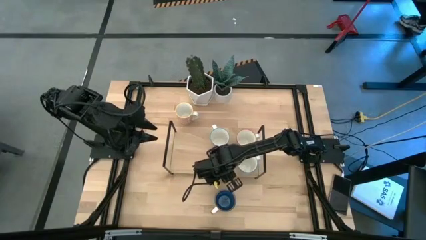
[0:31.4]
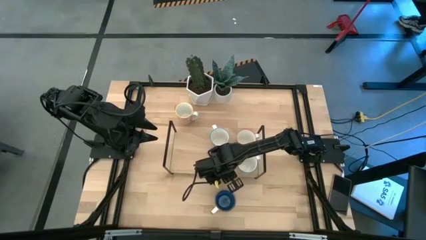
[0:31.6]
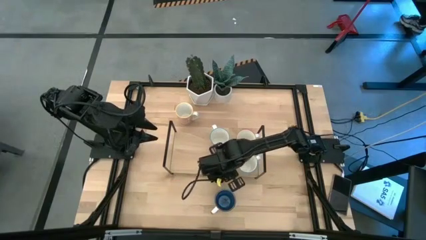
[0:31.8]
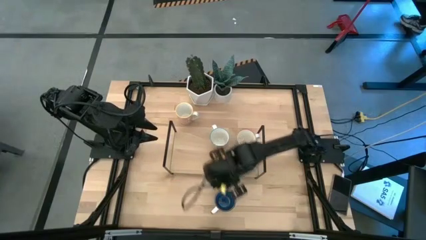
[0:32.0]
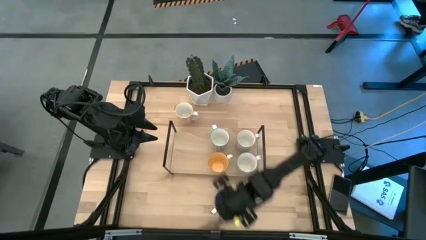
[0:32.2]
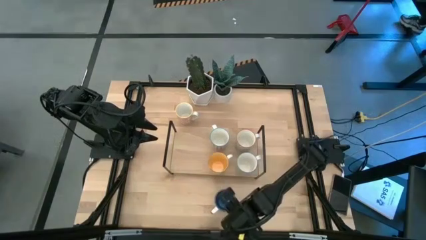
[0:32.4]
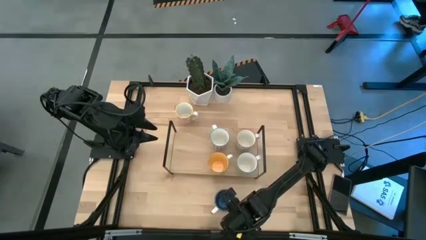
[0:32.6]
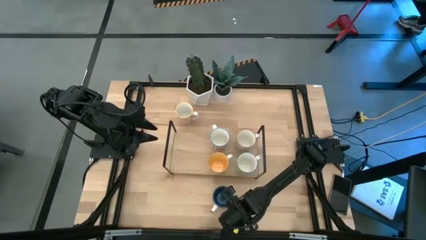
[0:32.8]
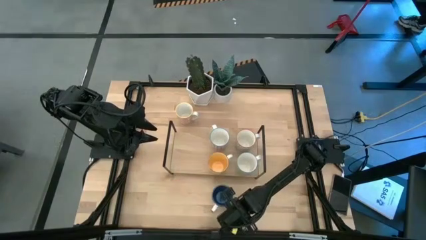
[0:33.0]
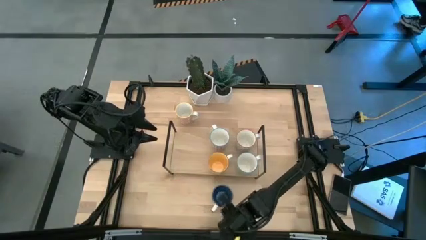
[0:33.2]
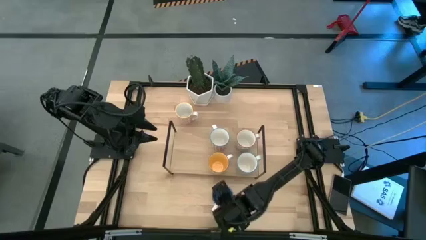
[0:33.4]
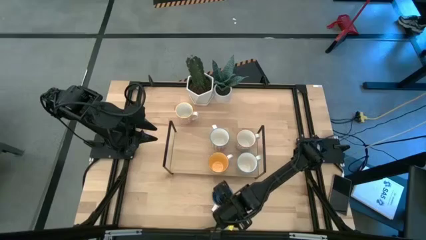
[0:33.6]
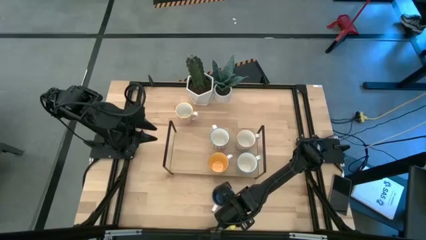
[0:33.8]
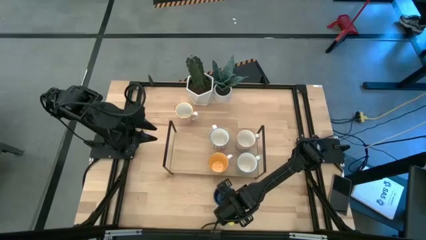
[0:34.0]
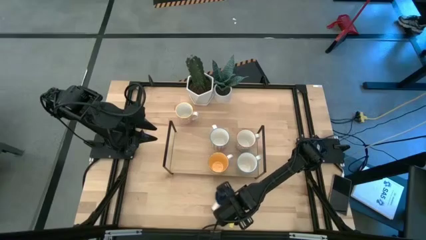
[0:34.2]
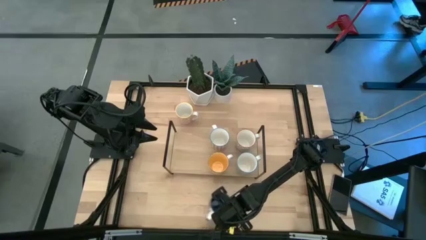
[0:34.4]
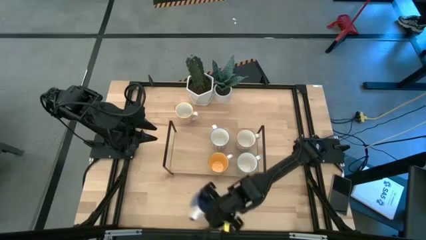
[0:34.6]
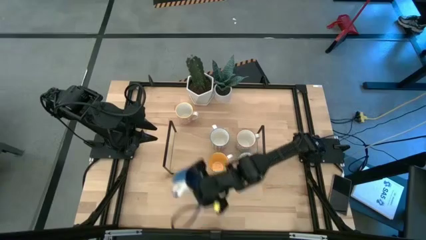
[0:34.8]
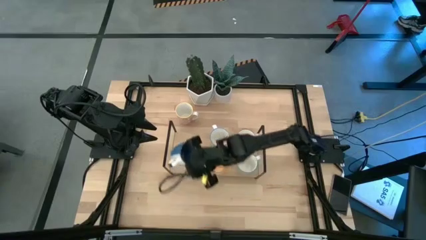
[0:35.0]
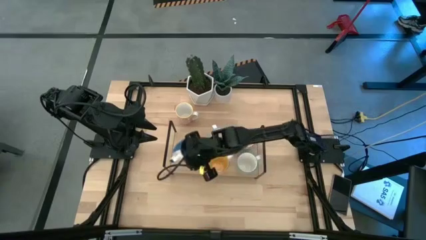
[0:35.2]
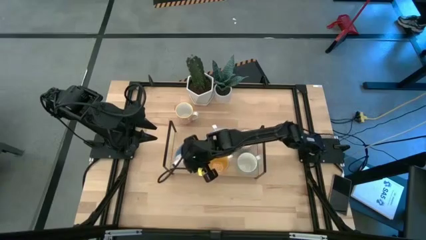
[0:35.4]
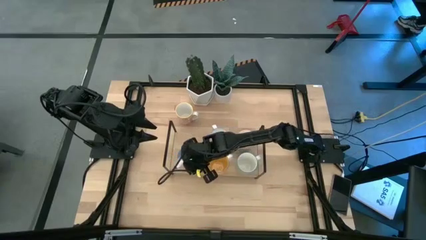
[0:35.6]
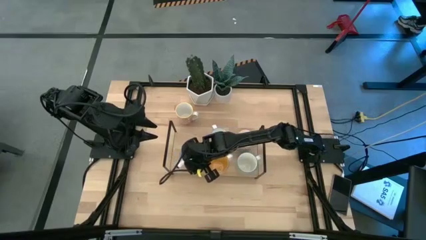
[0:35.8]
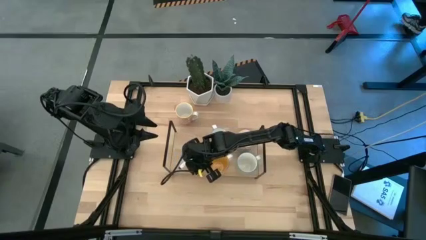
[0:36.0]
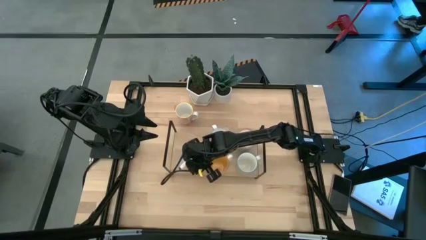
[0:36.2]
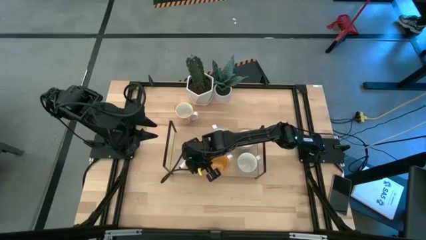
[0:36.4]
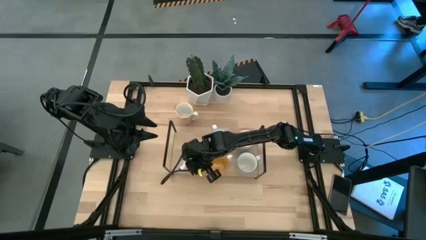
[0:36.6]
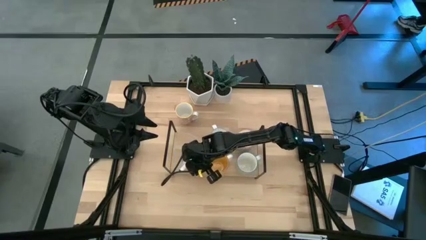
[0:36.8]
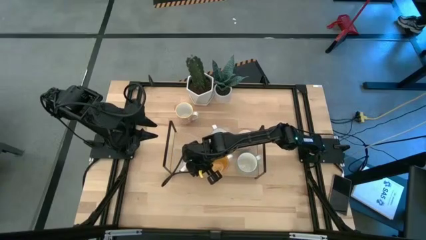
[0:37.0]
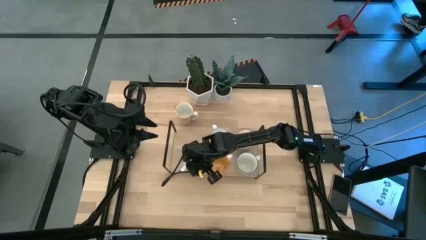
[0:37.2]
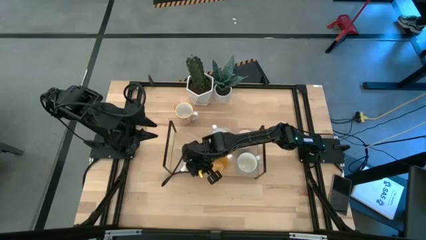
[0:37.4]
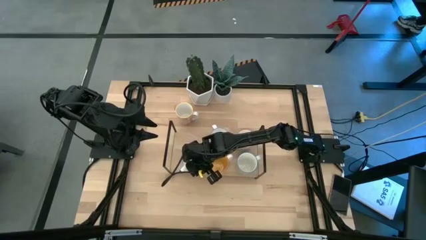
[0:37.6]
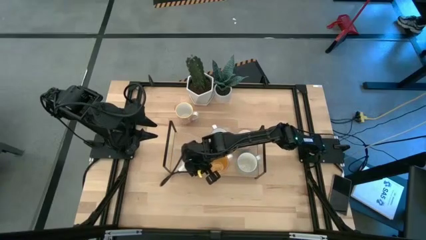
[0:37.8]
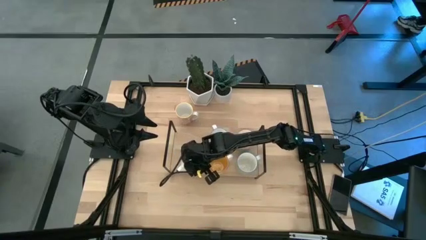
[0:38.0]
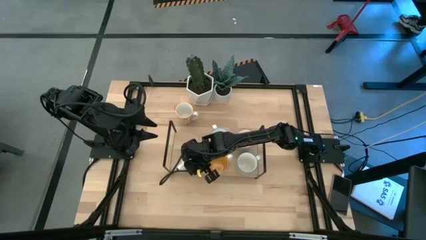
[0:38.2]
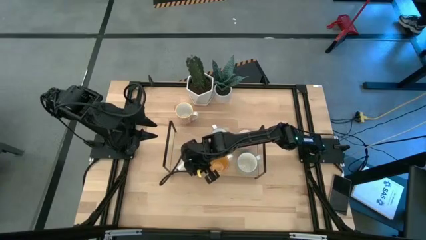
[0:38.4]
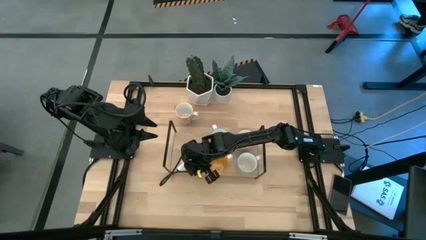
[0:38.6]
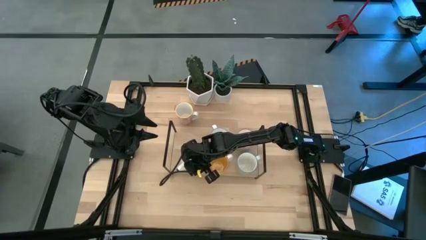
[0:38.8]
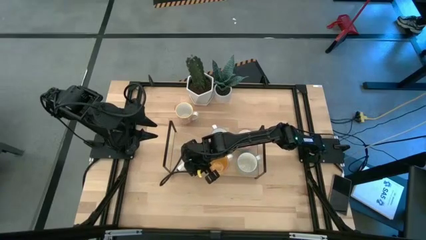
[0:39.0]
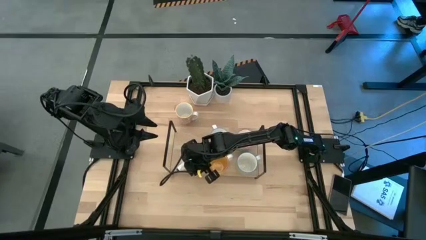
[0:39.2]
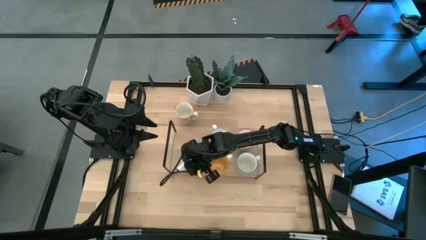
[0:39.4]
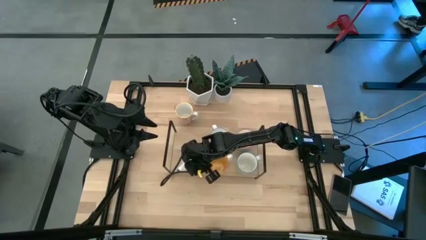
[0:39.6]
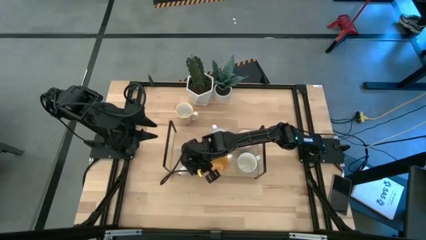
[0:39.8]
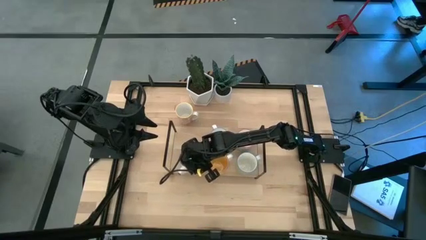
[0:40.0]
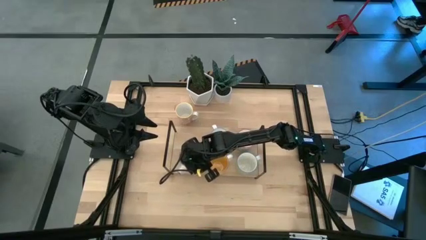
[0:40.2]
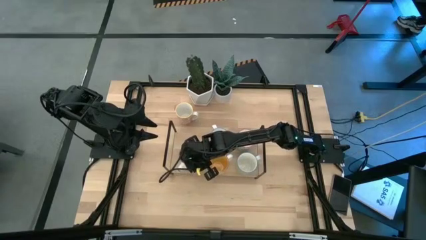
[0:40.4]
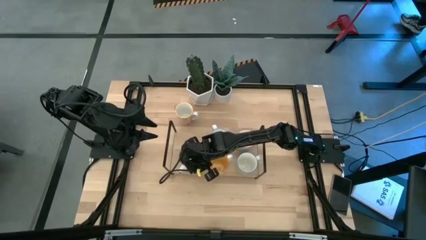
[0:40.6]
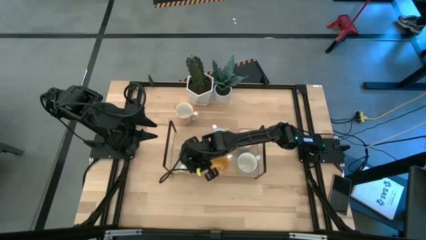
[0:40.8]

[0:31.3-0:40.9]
Task: Place coffee mugs
Put the blue mug on the shelf

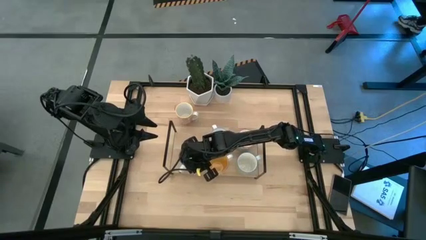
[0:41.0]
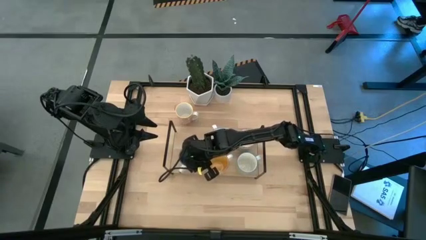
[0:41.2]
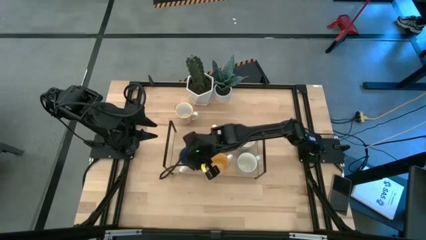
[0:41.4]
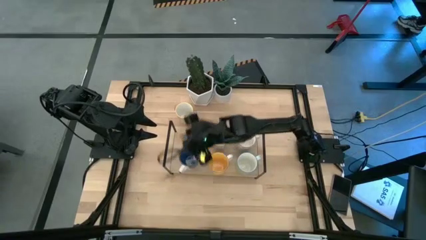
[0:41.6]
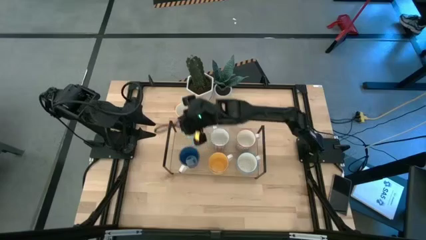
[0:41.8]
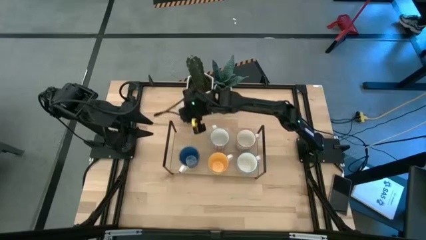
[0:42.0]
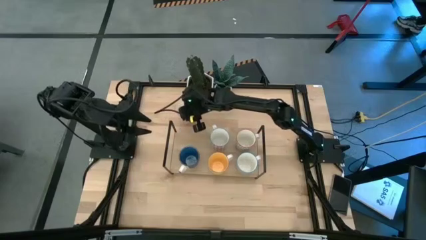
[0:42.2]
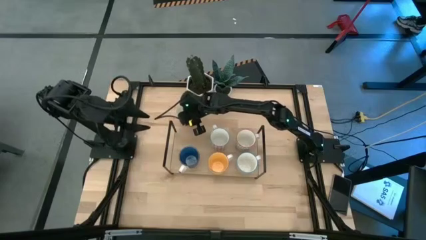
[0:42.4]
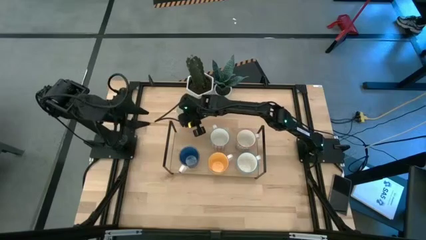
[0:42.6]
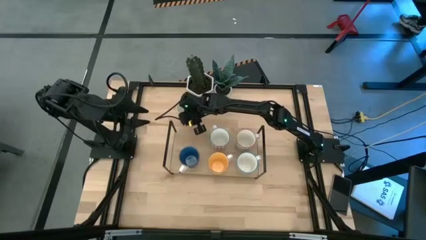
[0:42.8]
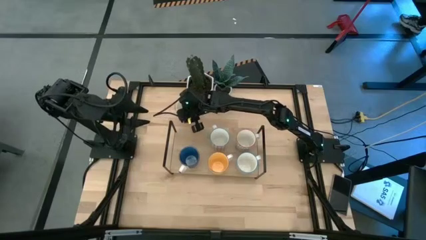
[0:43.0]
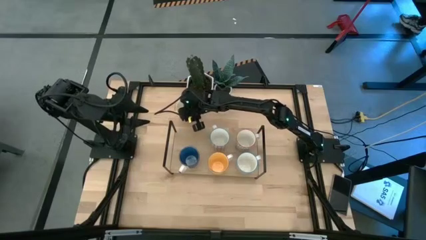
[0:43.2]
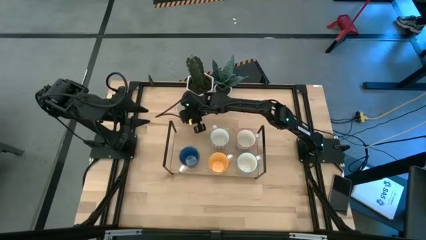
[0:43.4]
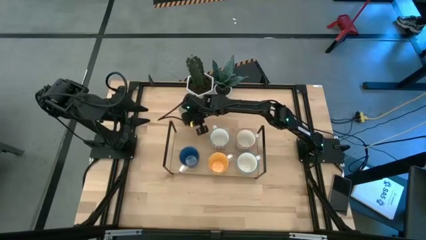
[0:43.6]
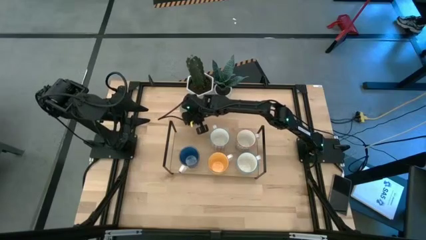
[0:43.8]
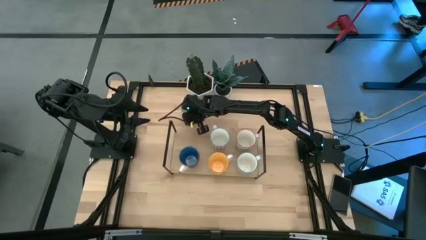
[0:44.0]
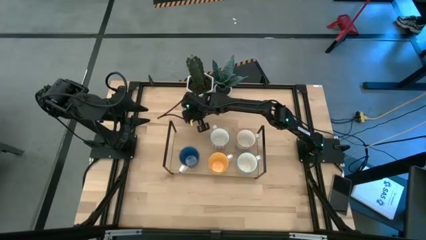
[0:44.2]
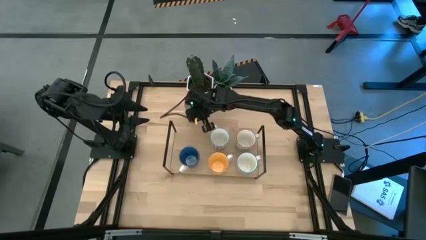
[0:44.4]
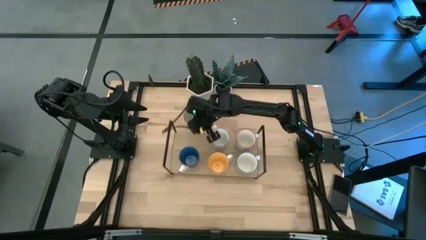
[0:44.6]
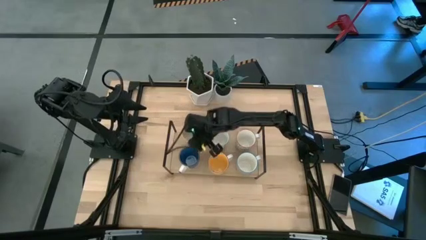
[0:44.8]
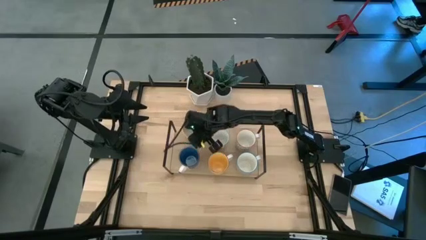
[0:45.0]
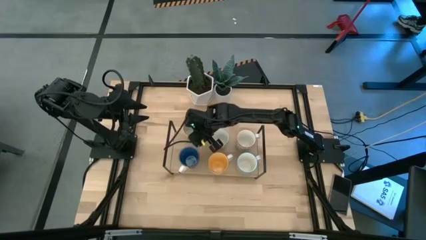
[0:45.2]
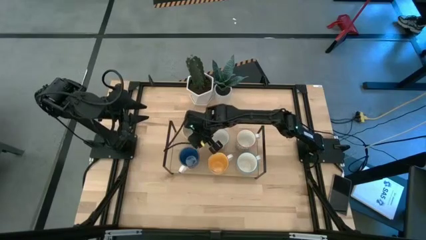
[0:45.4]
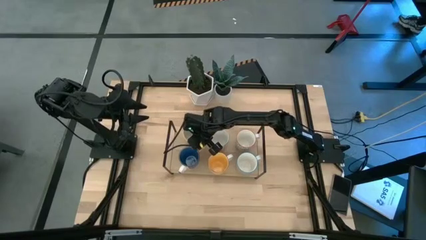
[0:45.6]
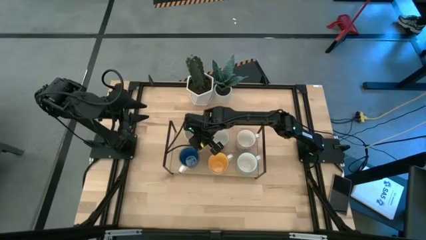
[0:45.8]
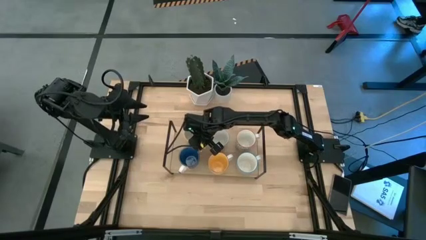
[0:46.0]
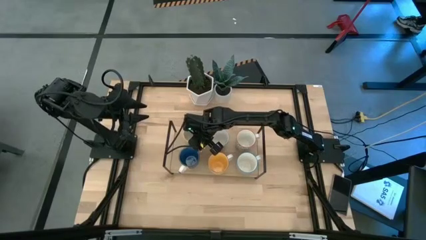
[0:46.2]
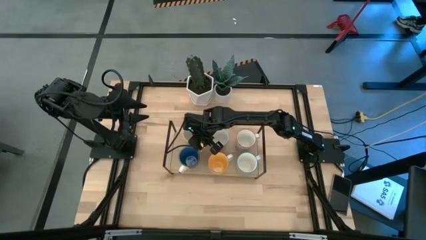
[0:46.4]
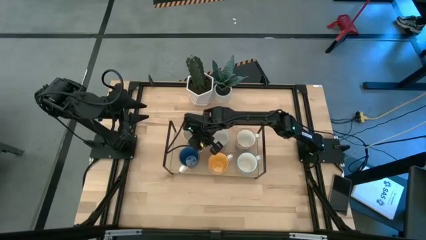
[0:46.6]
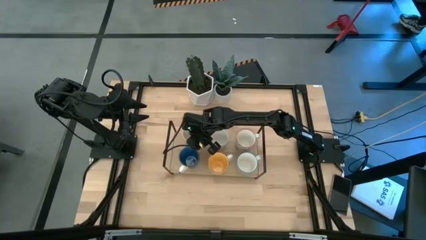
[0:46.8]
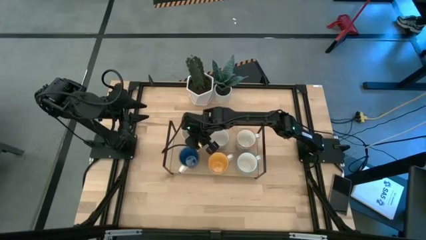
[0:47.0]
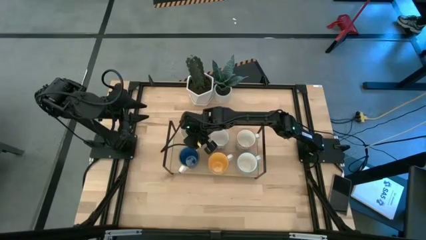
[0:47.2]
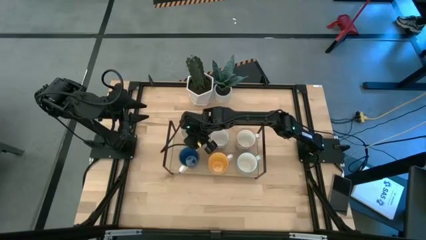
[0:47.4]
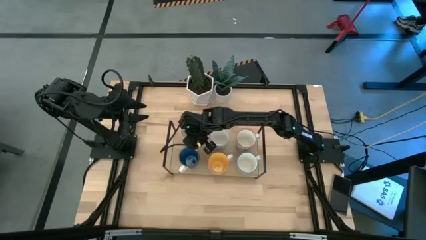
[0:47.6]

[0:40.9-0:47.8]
Put the white-orange mug on the shelf
